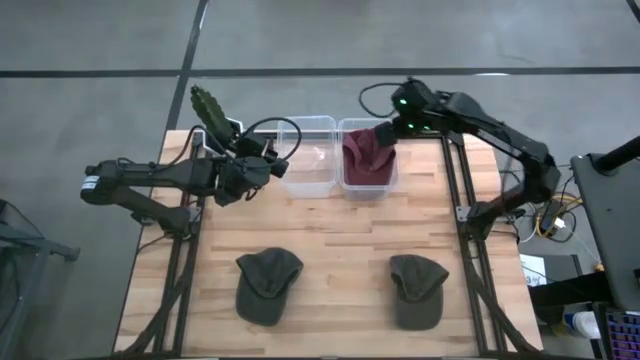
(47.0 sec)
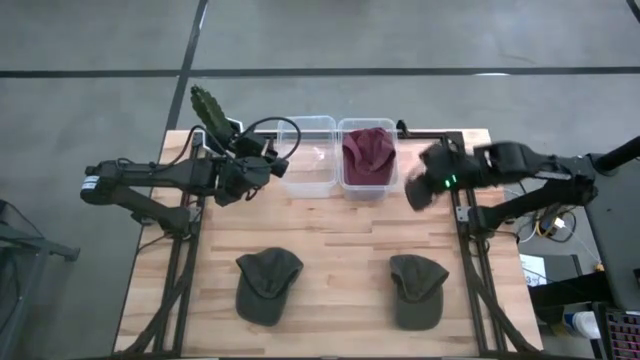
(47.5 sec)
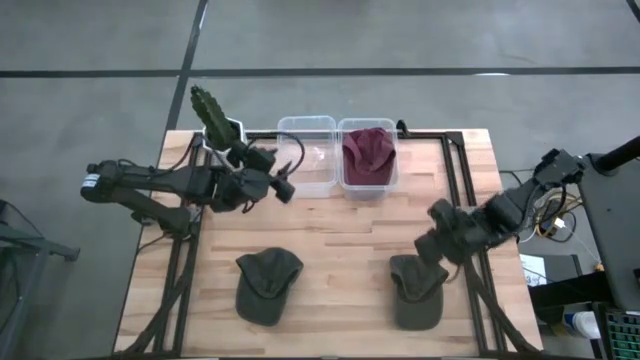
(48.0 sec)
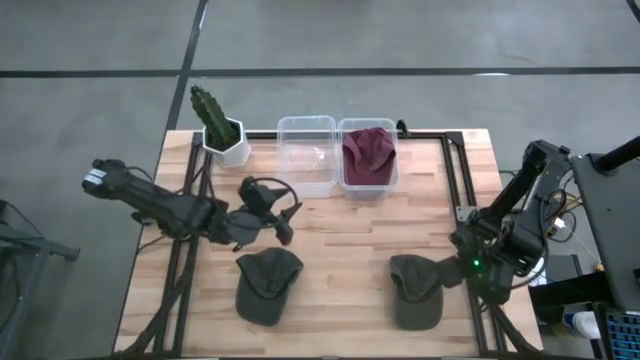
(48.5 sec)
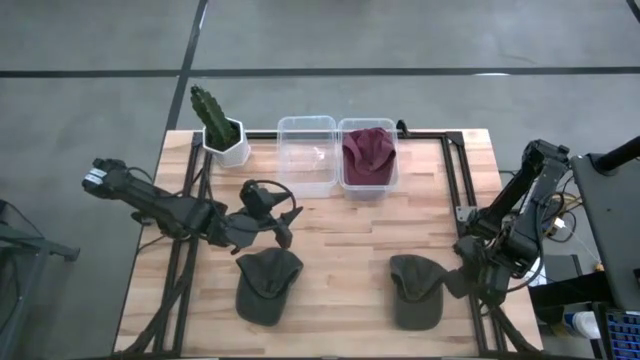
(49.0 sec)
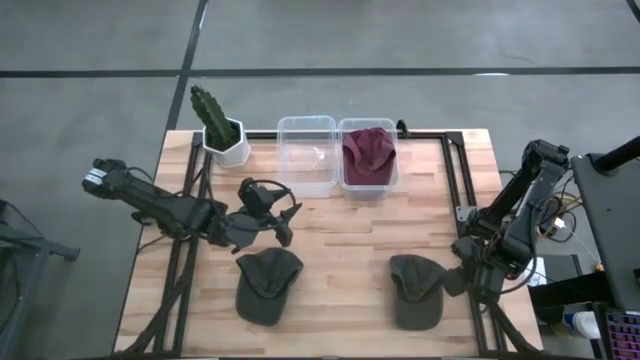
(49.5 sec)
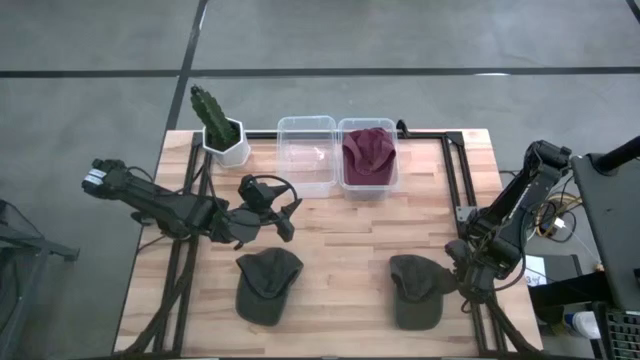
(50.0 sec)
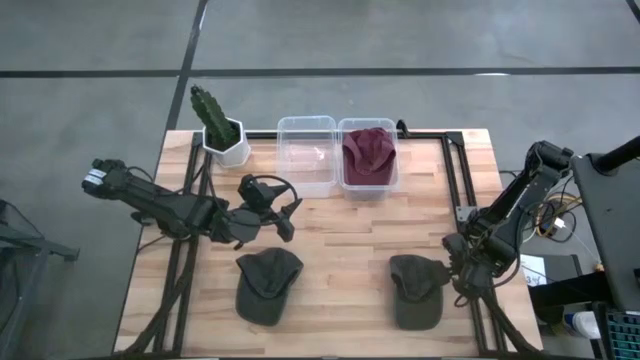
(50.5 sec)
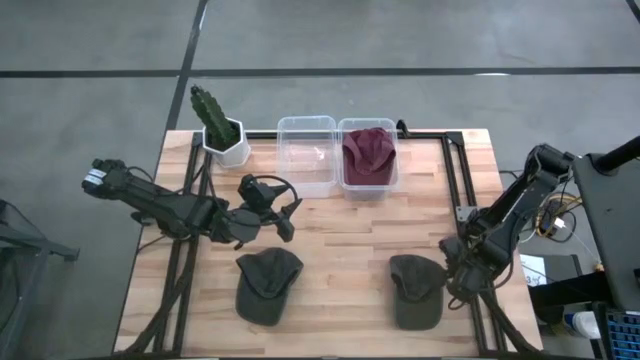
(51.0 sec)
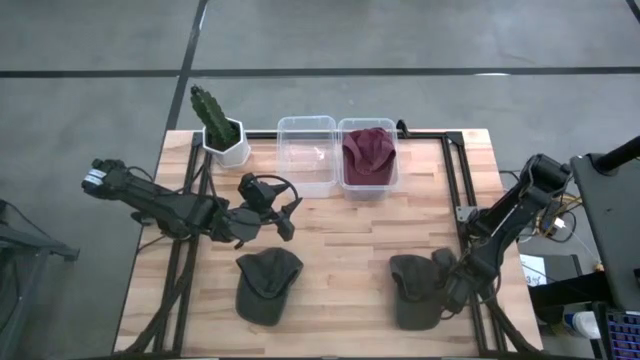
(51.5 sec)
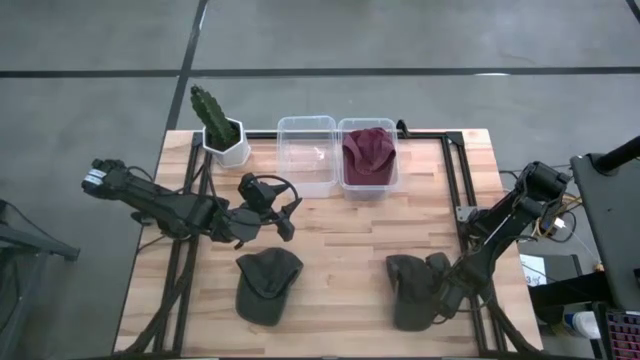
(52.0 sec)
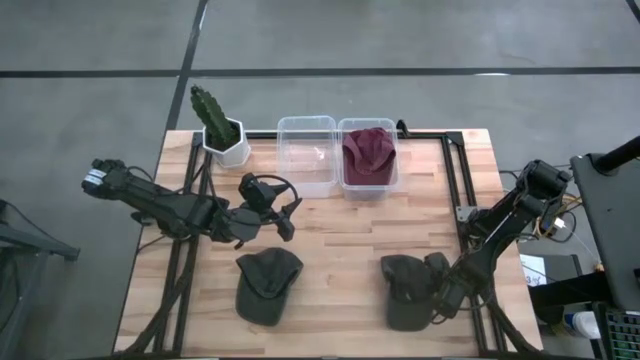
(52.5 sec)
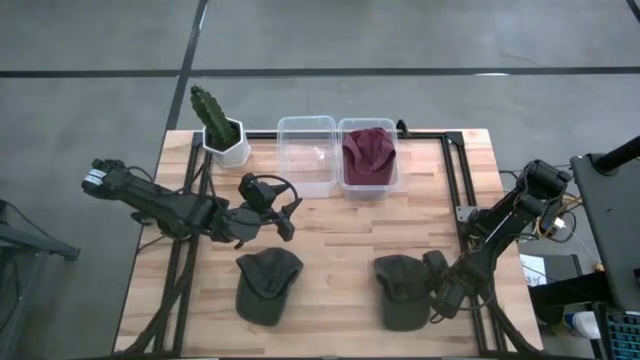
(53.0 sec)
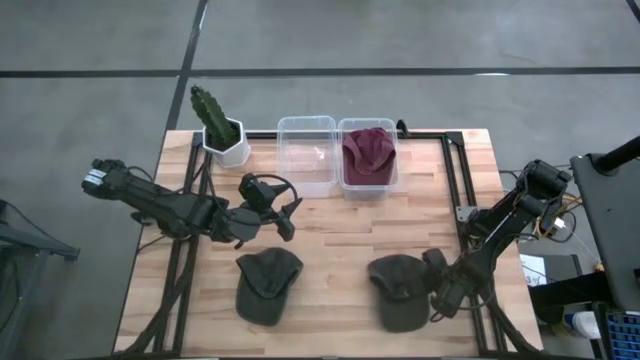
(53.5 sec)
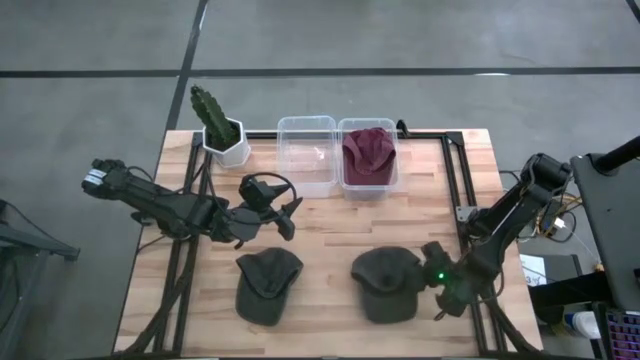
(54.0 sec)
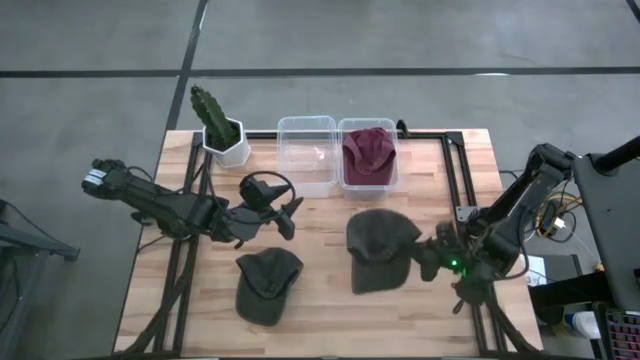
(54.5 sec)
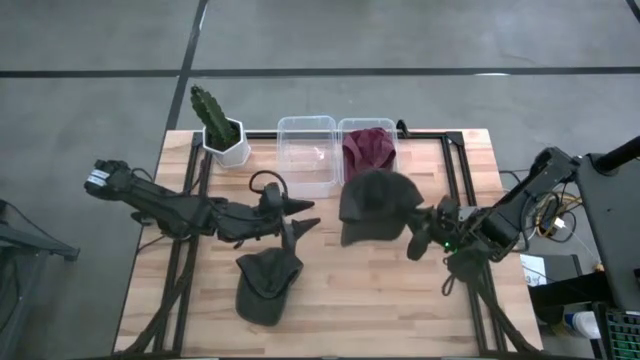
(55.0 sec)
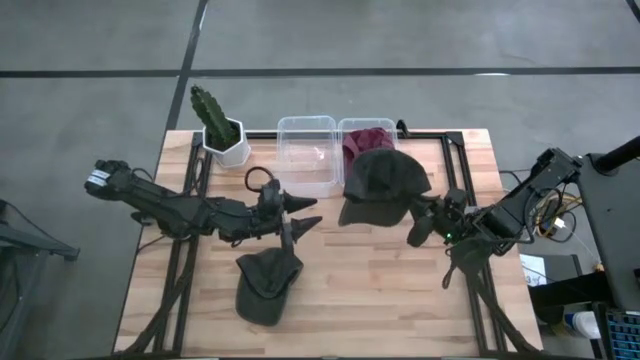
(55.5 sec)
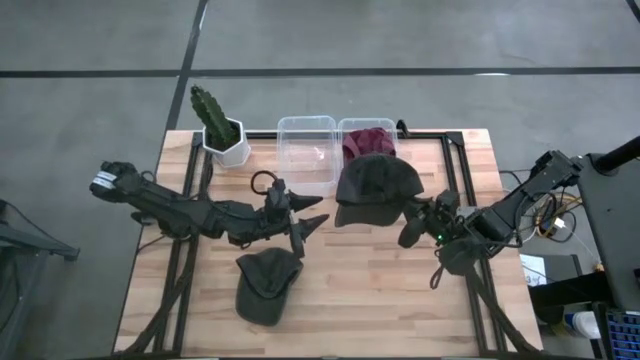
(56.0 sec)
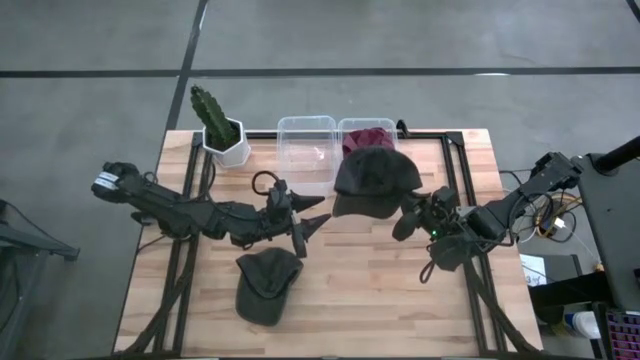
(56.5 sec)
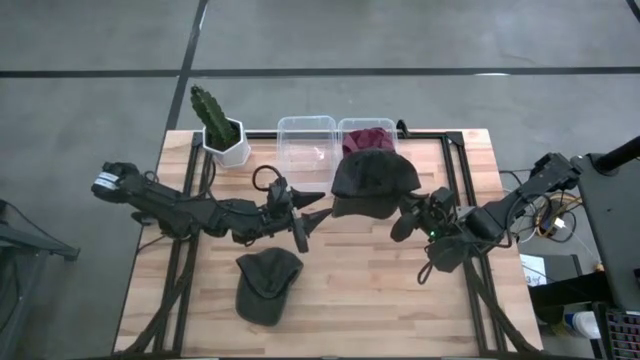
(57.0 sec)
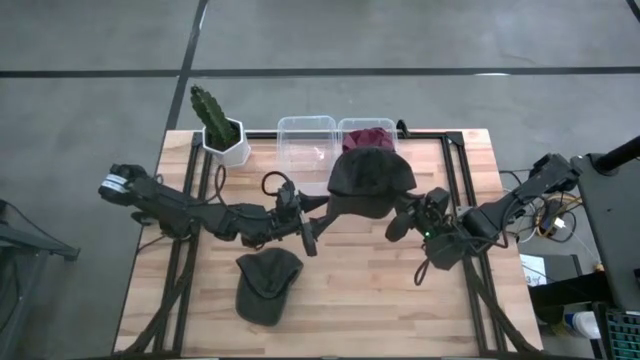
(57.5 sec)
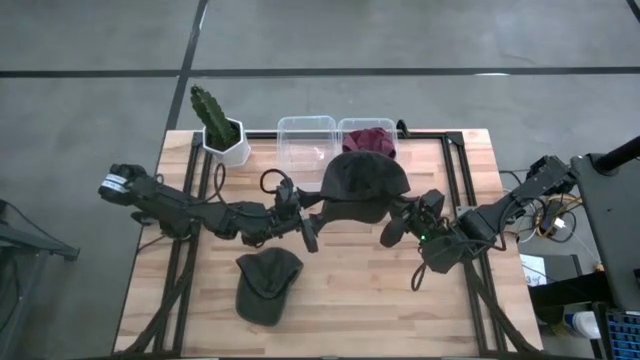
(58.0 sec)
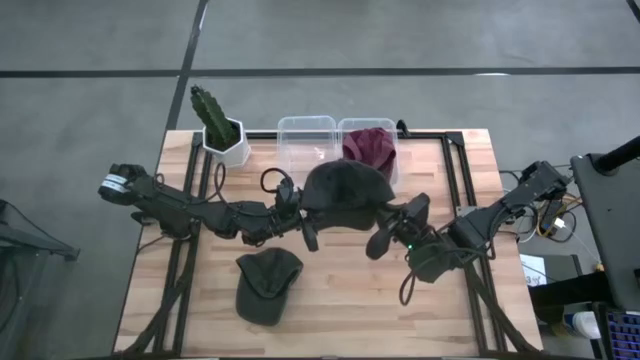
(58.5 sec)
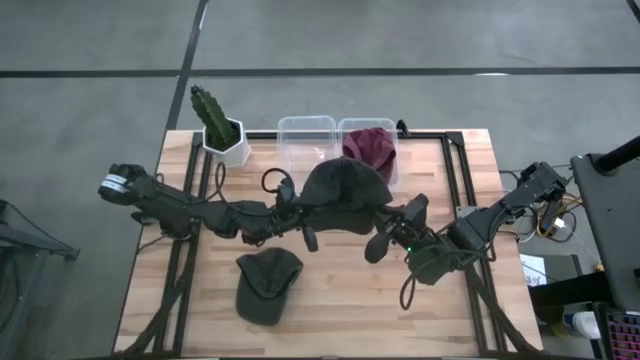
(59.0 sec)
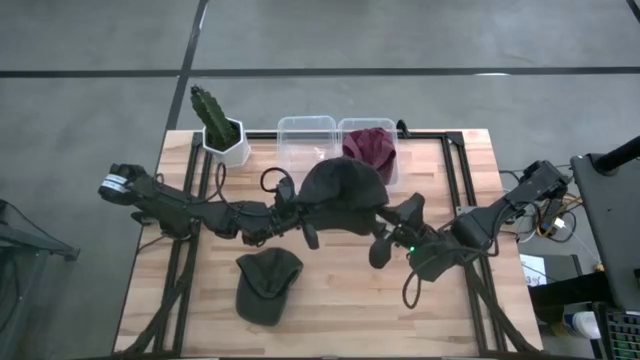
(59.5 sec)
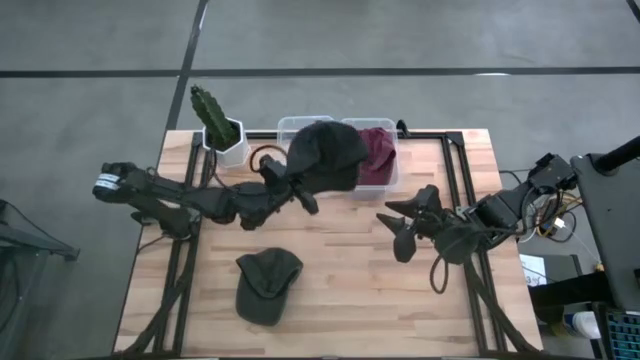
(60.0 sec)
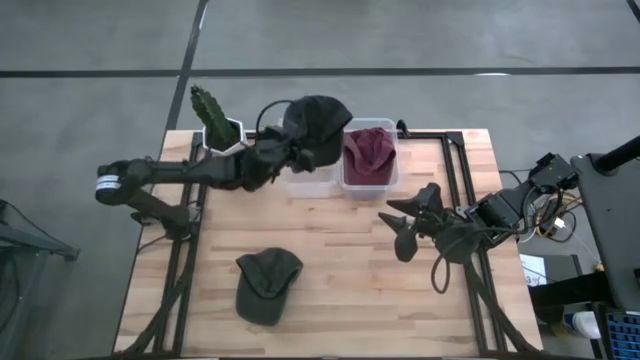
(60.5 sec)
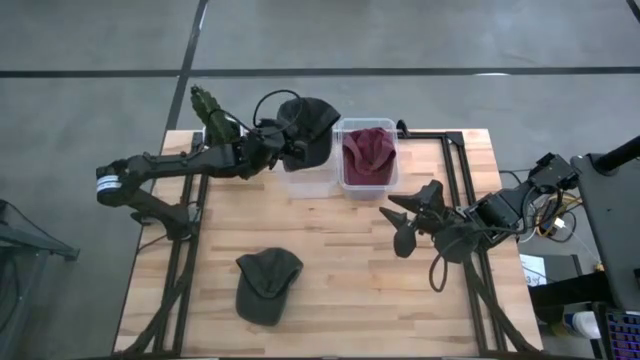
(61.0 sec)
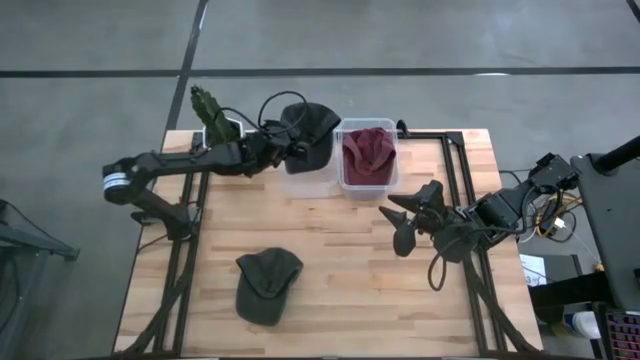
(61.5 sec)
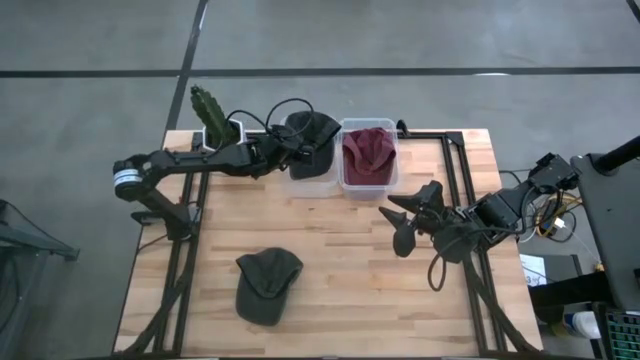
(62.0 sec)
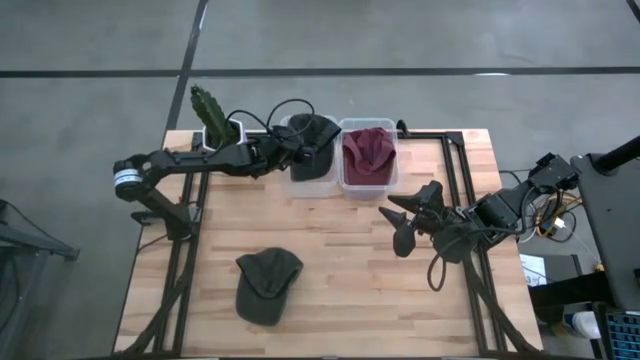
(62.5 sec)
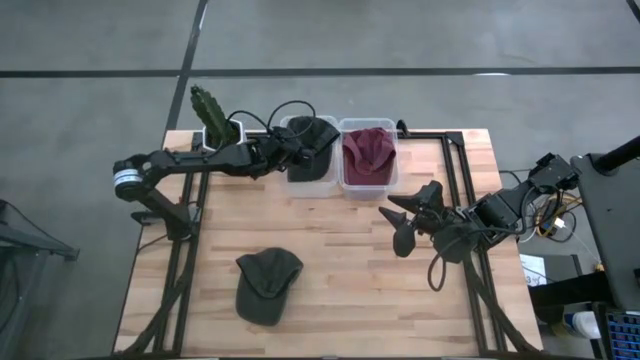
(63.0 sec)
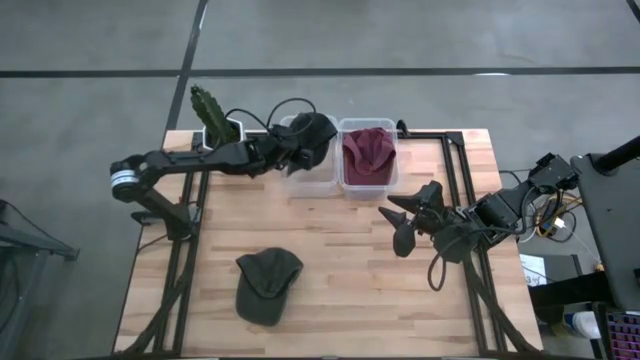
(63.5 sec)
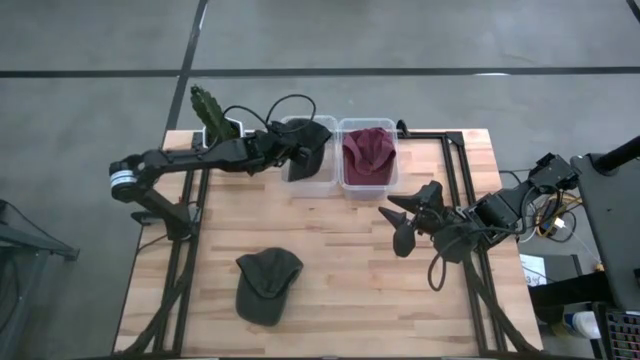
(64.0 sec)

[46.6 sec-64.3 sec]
Task: Pick & Place hat
Put the right black cap into the left transparent bin

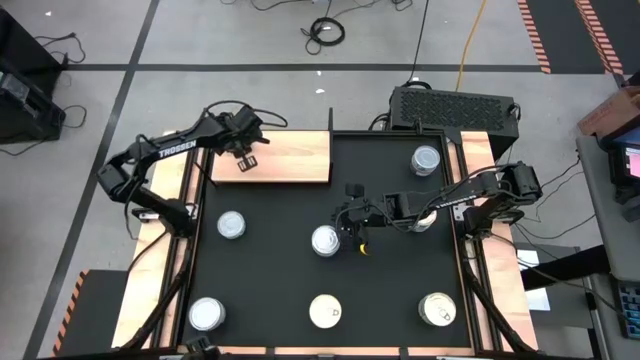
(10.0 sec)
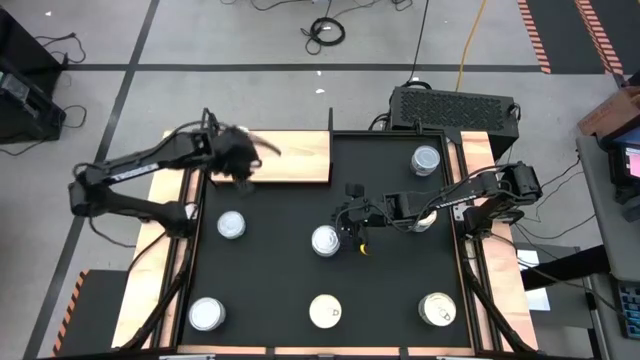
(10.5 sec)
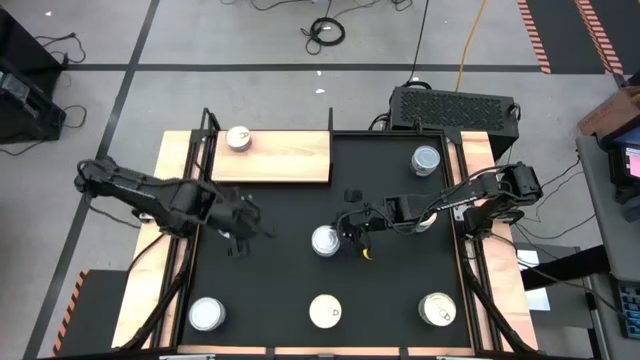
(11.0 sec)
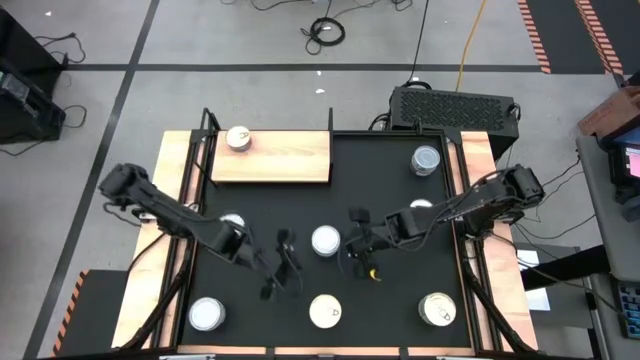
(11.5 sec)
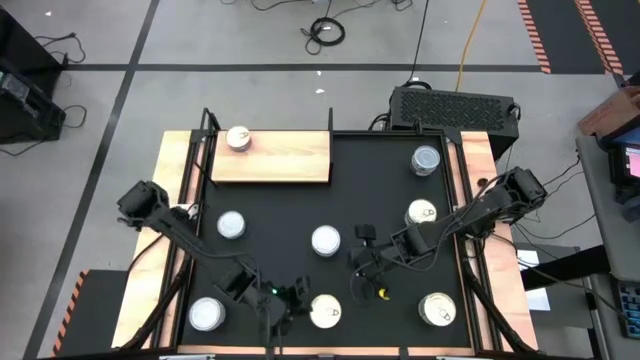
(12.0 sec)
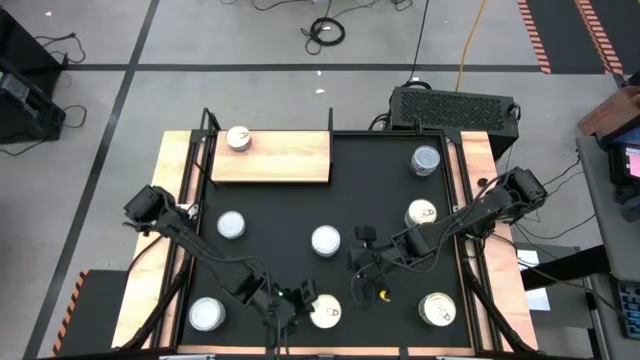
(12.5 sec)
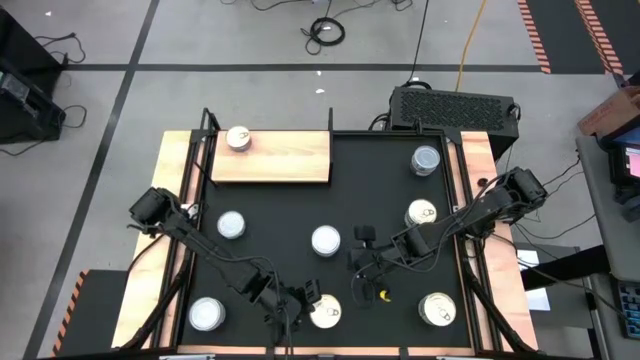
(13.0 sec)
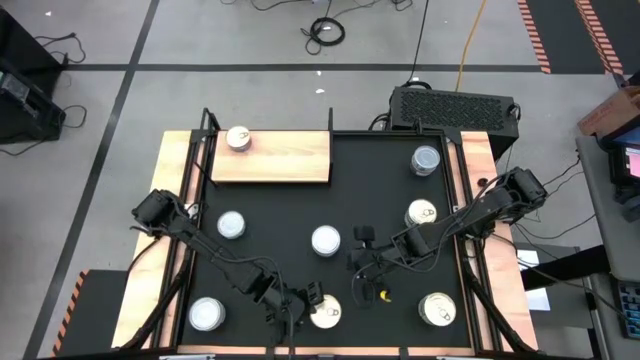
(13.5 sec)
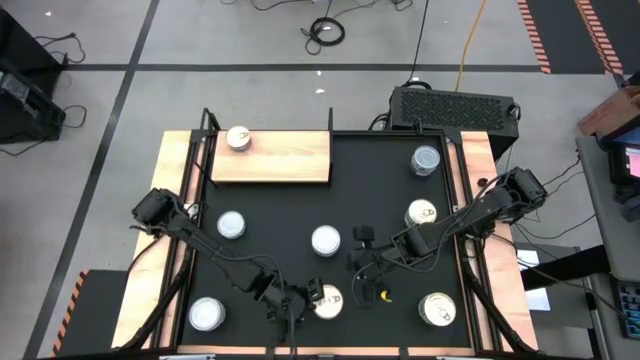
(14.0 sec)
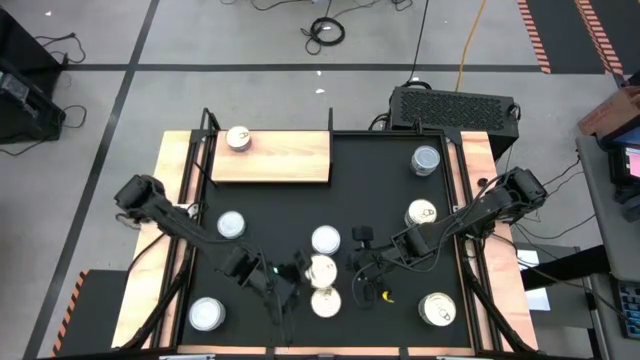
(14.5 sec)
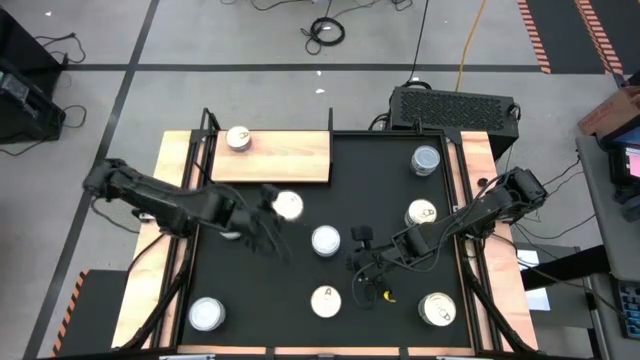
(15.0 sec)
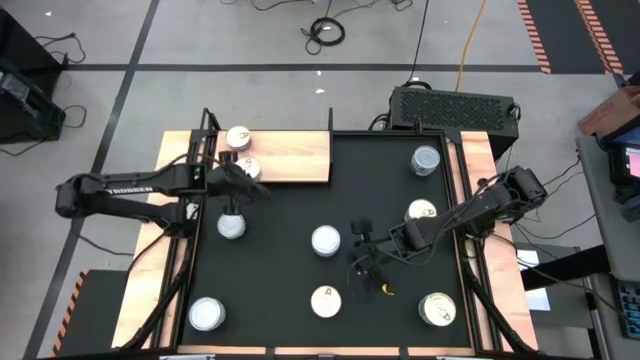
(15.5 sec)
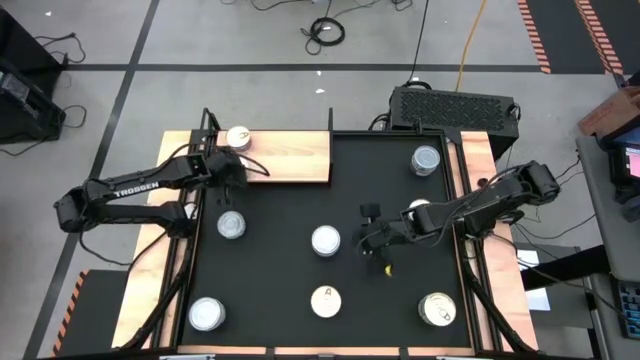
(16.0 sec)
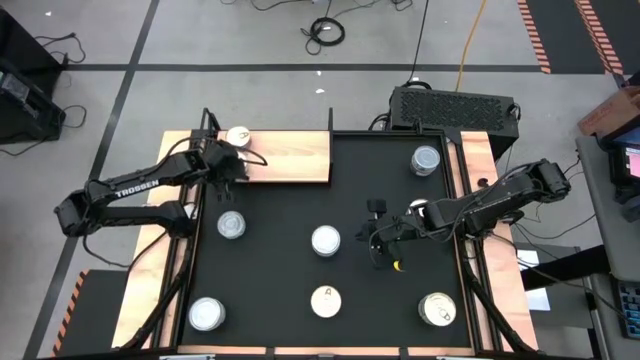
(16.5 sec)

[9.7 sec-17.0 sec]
Task: Stack canned seafood by type on shelf
Put the blue tuna can aligned with the blue tuna can on the shelf
